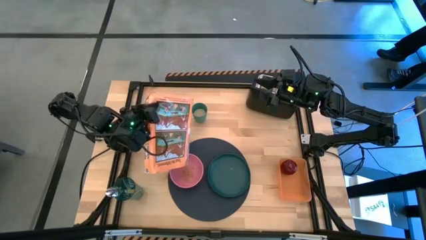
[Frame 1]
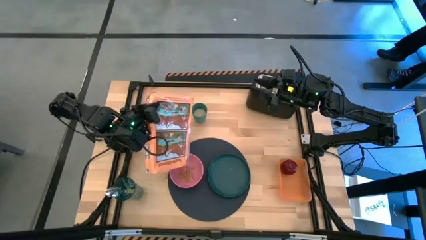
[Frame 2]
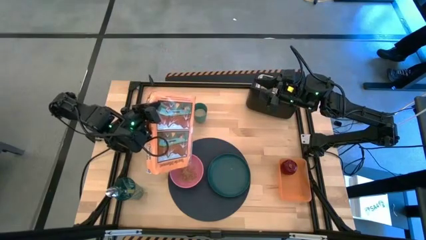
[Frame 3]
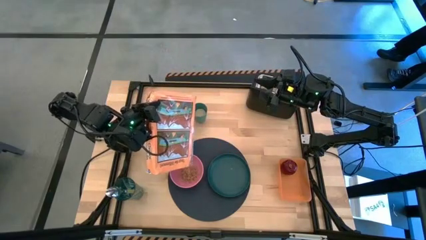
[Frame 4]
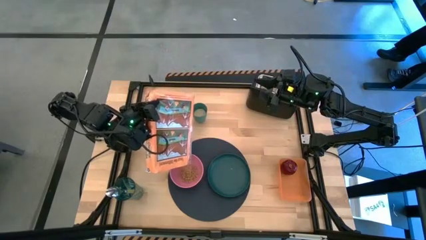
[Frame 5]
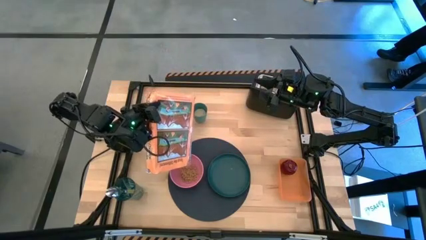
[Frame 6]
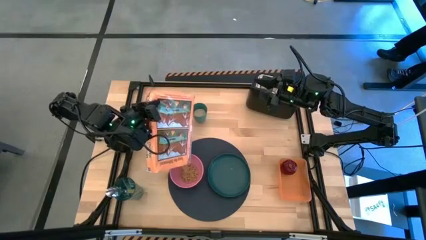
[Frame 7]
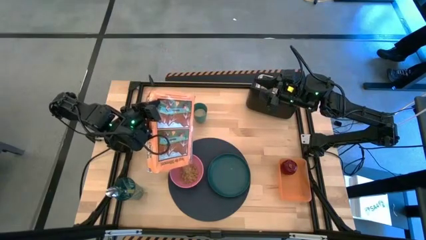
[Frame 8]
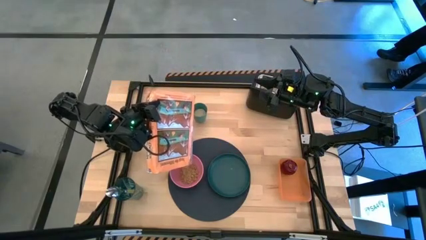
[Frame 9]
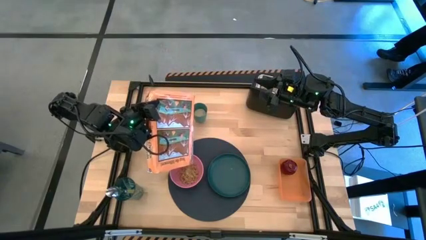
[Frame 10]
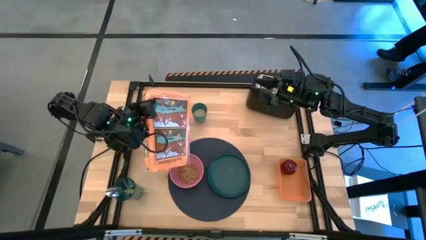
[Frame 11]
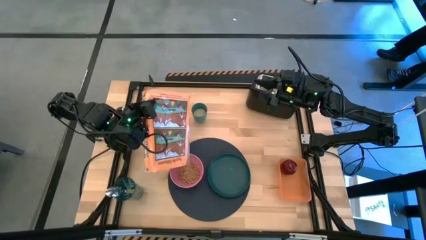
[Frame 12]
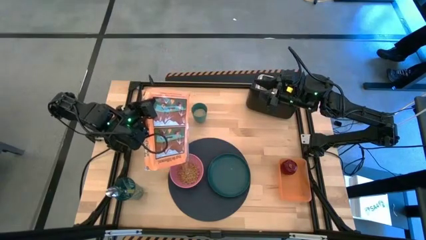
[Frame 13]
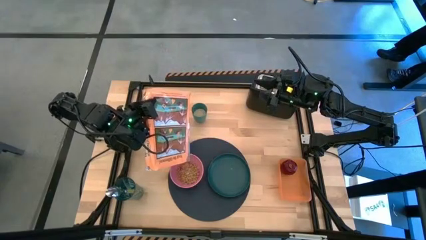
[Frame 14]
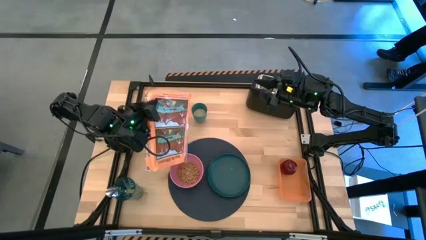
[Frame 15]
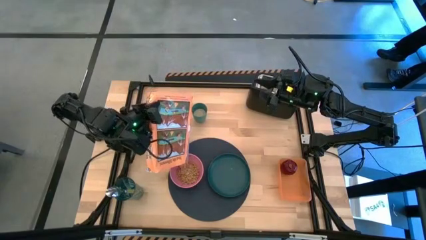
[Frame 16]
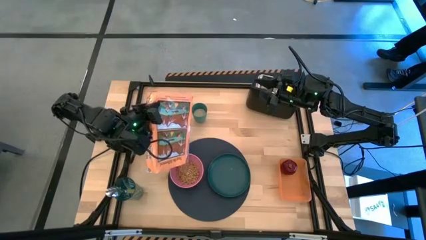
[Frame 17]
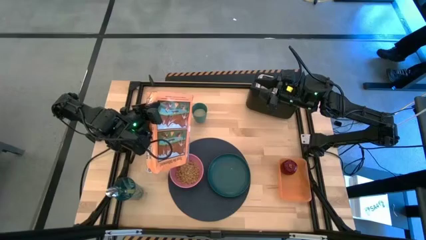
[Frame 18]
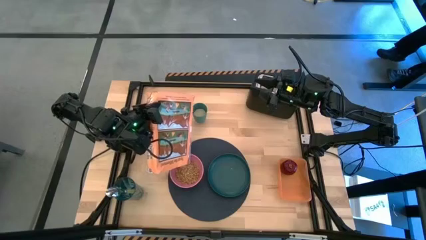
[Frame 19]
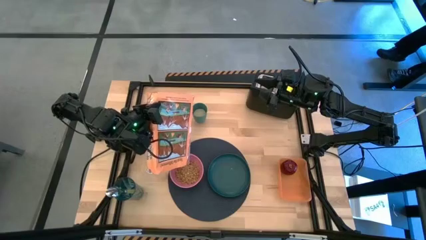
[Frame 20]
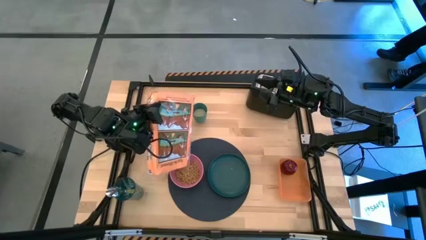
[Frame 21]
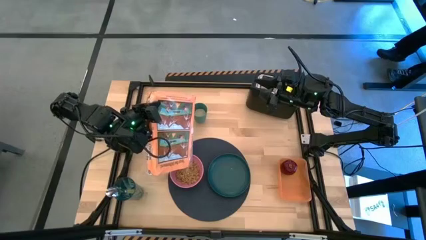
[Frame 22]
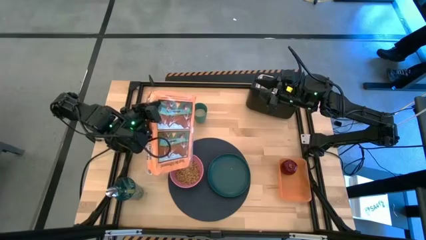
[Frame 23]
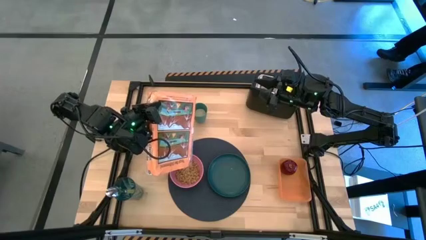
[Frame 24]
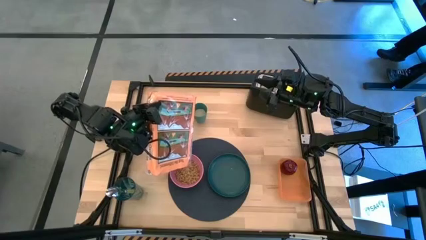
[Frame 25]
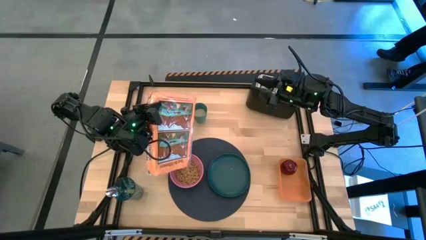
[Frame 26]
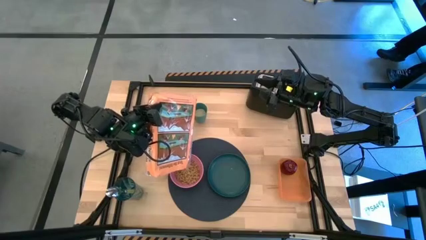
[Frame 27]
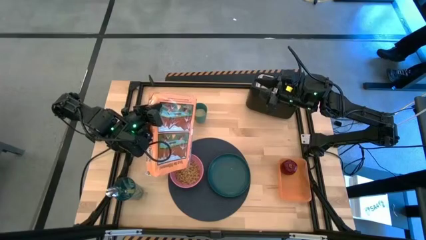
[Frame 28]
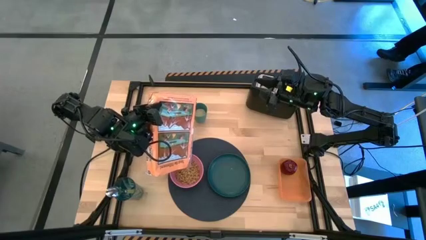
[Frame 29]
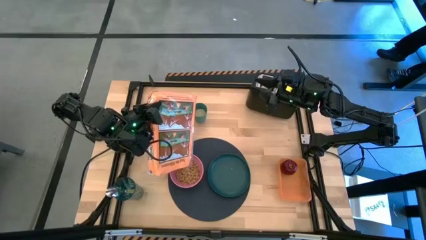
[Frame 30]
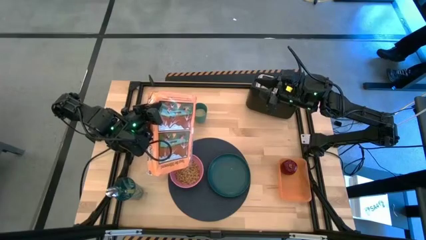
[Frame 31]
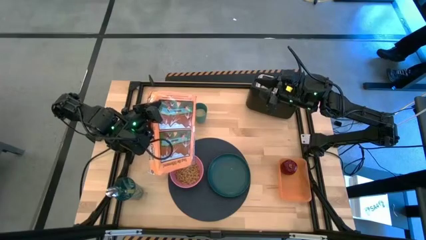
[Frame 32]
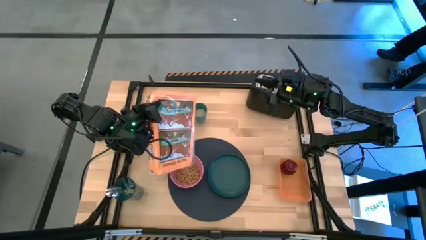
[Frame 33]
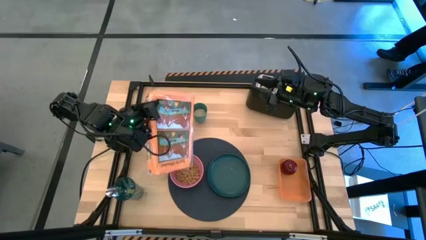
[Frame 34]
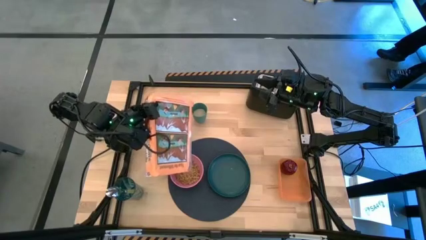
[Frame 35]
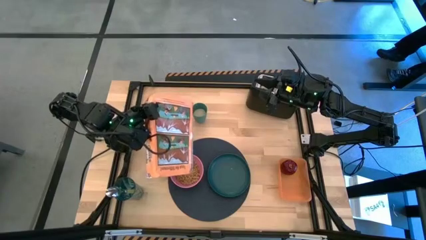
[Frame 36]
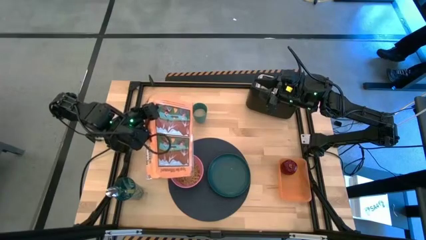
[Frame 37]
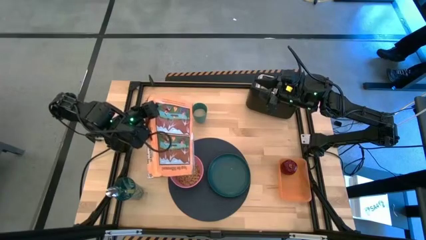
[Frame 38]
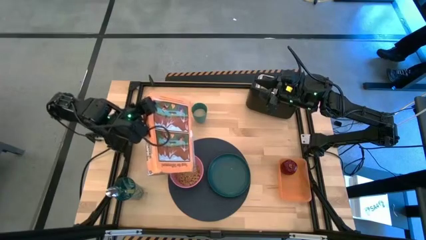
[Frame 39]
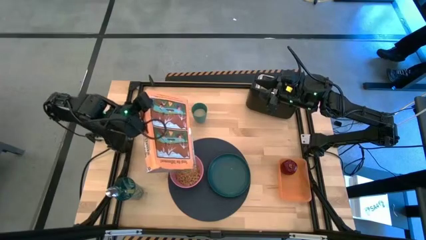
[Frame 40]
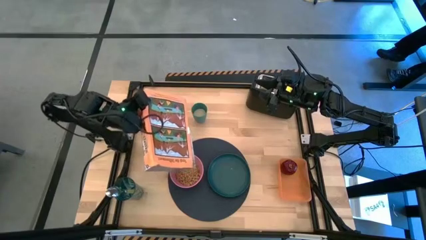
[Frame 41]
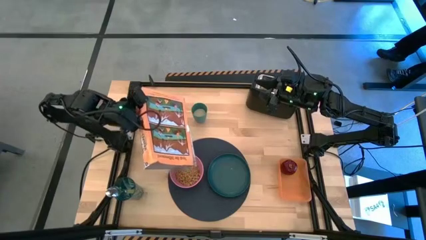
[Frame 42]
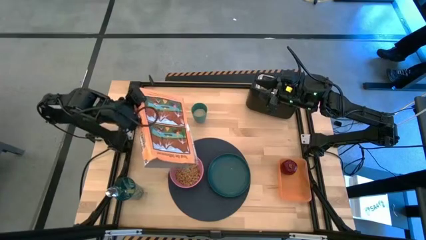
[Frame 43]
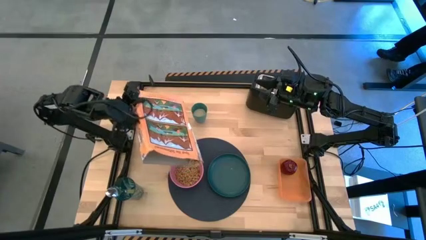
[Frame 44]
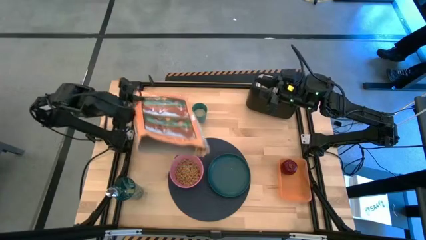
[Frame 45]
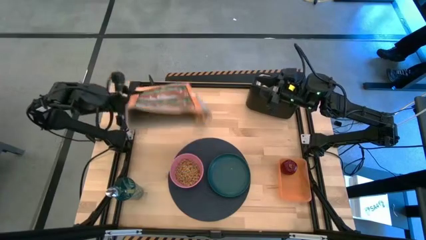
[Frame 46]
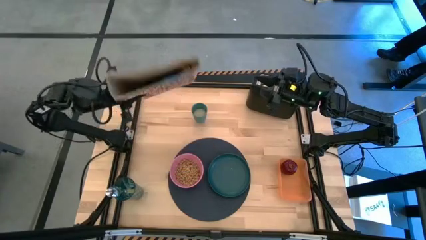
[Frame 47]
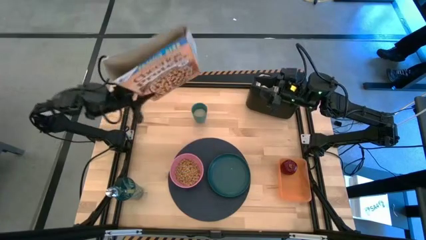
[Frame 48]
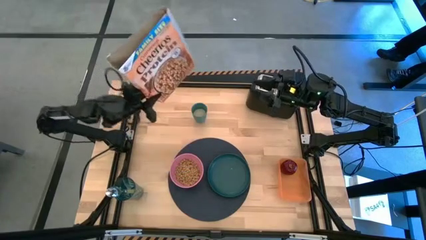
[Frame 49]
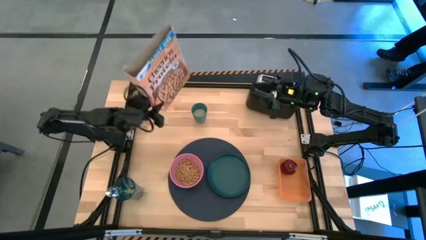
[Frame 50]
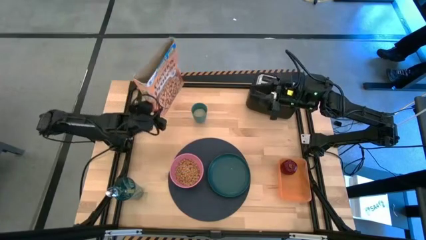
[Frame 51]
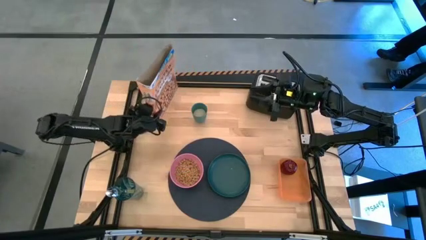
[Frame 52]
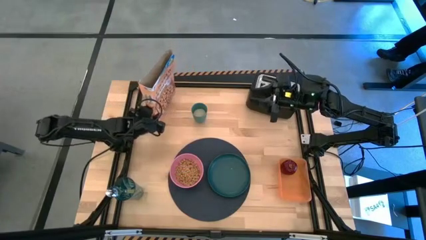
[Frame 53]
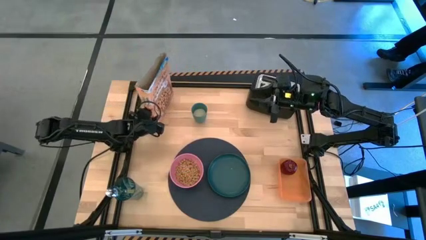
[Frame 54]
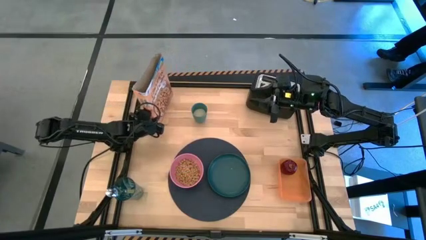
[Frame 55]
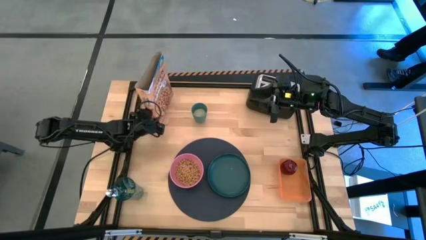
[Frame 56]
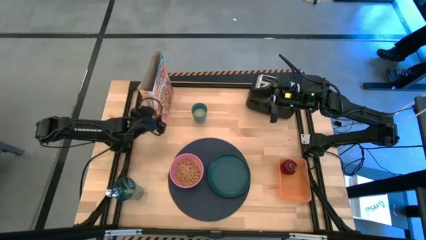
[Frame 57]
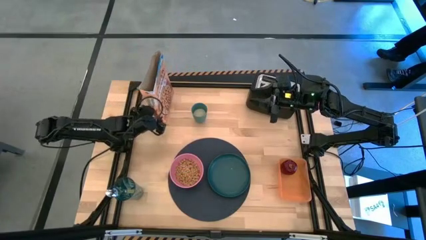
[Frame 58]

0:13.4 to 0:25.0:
Task: Arrange a breakfast setting
Pour the cereal from the cereal box into the pink bowl

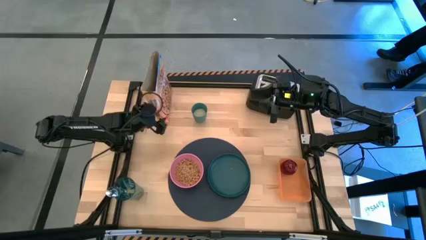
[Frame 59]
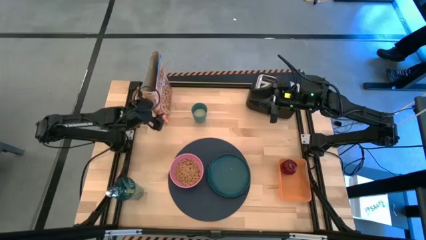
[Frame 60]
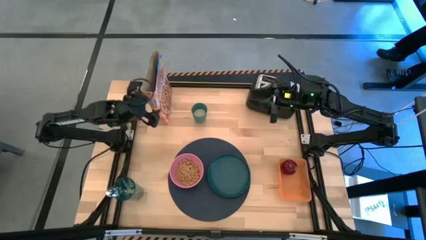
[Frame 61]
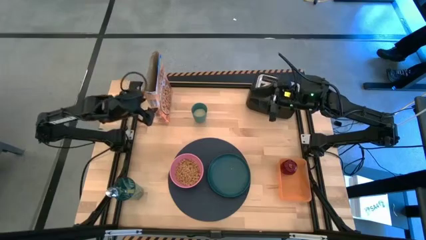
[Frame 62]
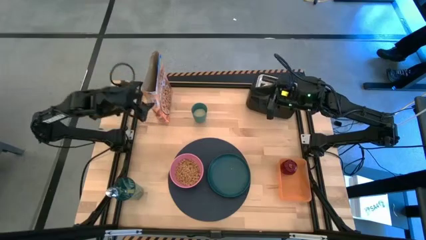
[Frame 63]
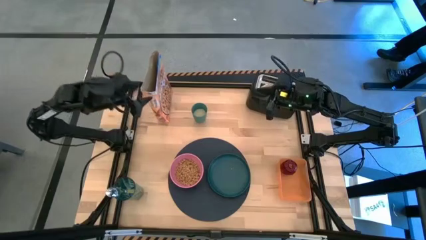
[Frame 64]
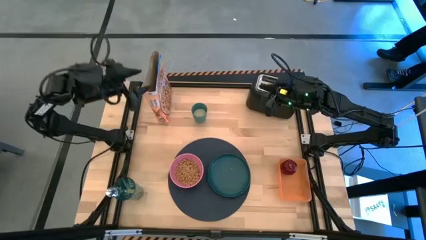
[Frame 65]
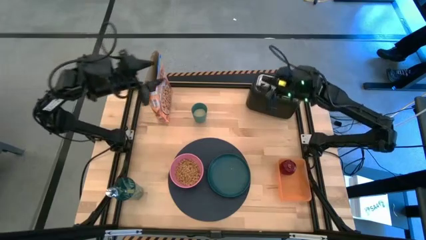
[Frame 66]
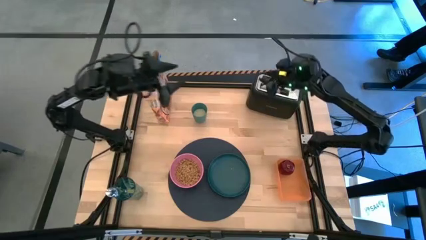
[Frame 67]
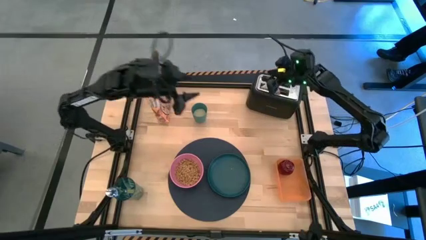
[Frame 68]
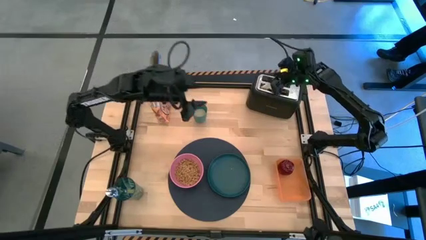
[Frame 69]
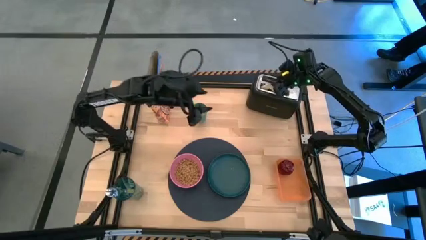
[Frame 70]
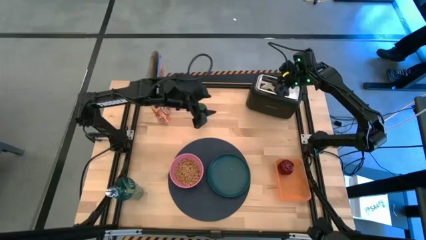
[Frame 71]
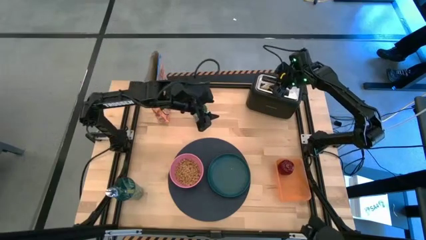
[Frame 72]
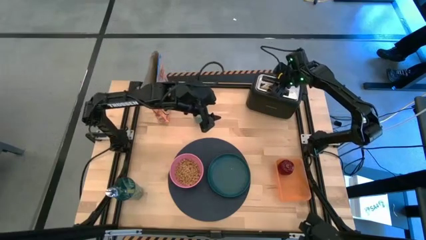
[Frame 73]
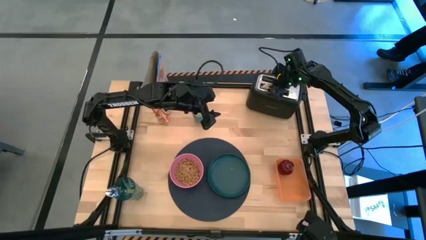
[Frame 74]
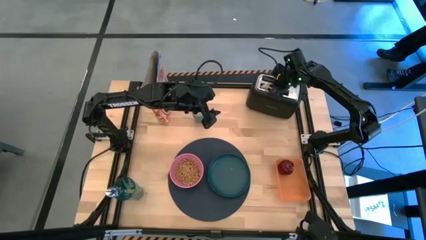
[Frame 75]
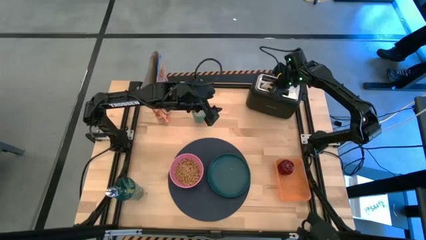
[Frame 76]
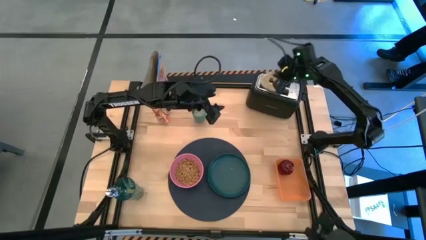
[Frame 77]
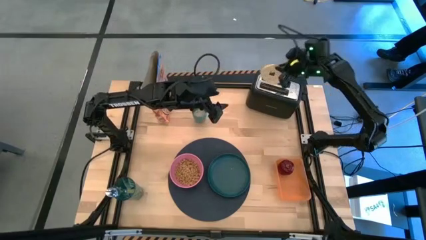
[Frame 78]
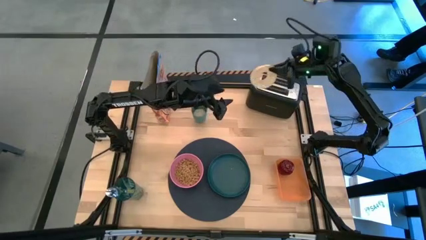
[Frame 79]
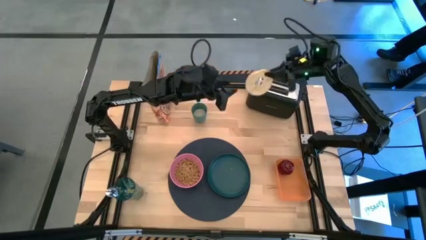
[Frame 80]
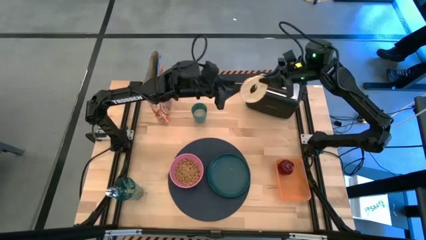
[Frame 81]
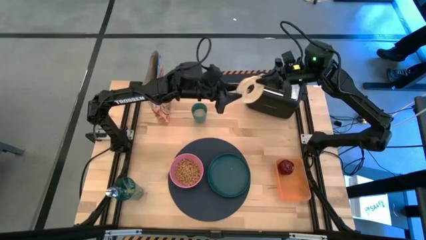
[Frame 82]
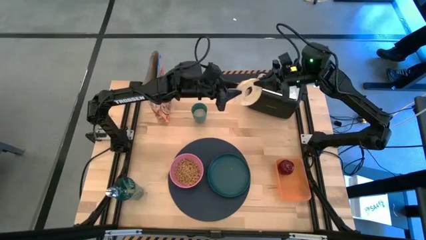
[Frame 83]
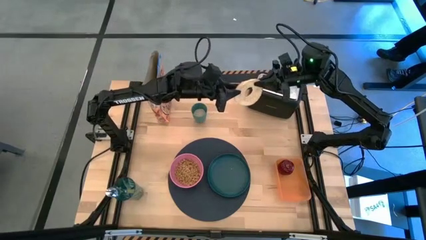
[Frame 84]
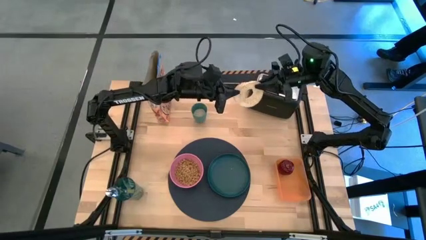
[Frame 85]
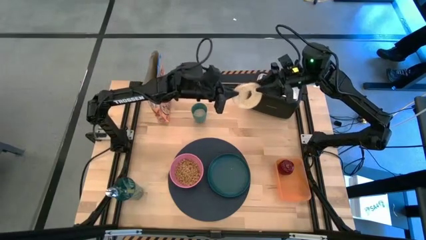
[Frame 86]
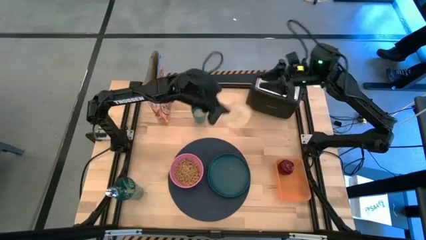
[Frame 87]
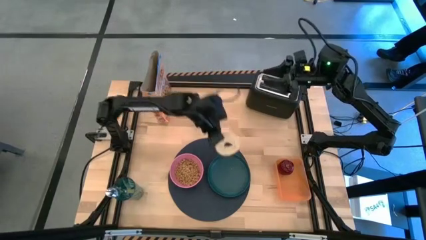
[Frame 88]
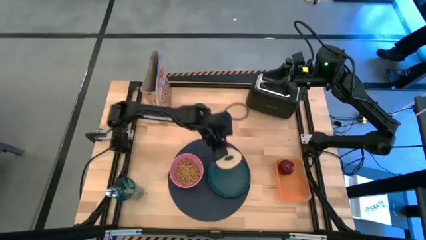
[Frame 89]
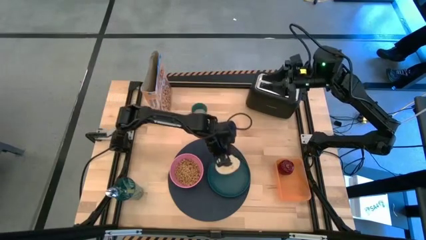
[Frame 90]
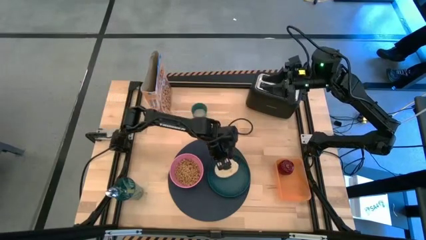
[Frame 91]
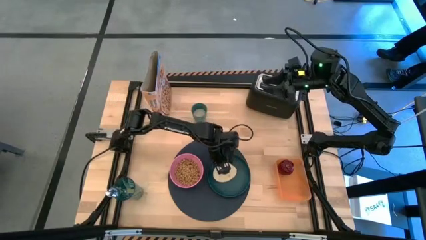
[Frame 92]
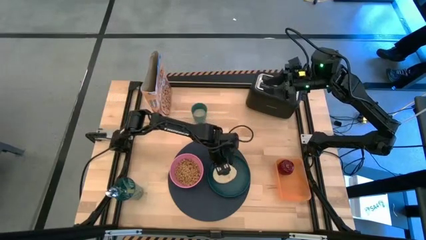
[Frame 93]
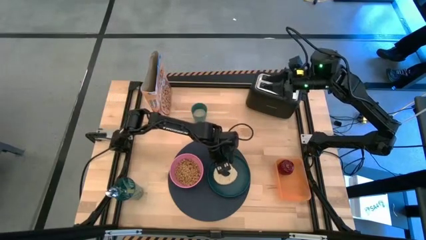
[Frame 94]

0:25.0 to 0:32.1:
Put the toasted bread from the bread toaster on the dark green plate
